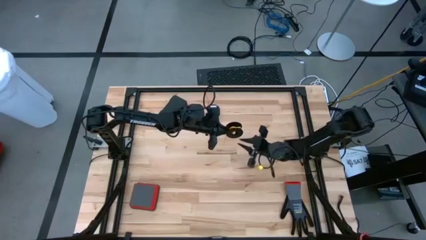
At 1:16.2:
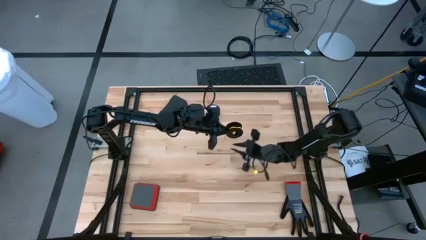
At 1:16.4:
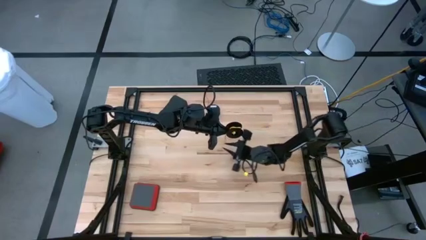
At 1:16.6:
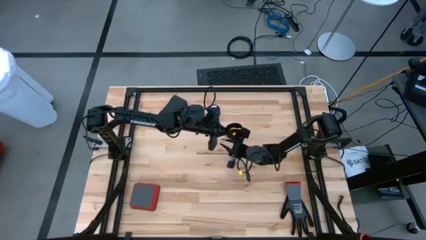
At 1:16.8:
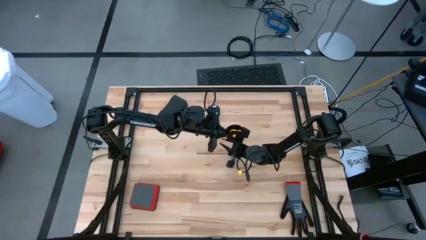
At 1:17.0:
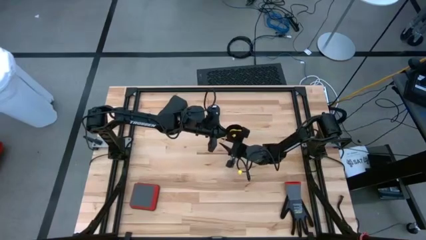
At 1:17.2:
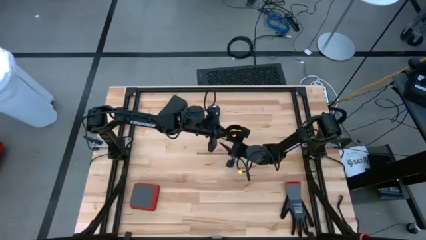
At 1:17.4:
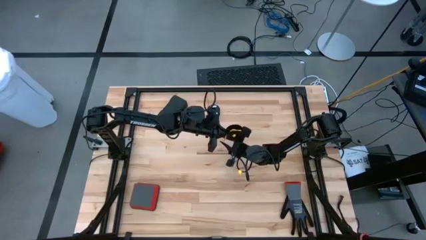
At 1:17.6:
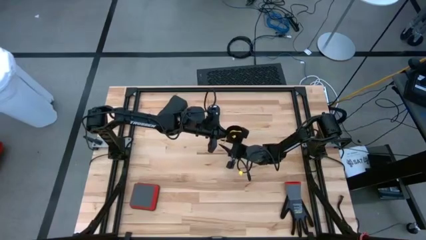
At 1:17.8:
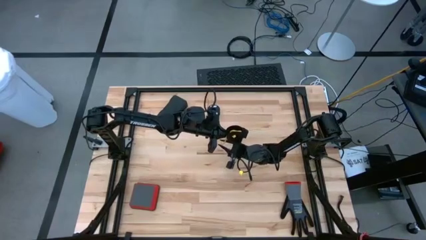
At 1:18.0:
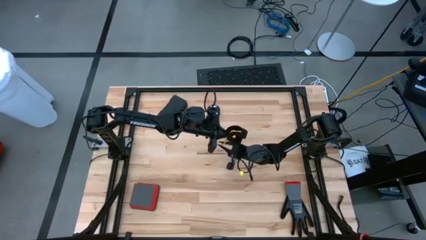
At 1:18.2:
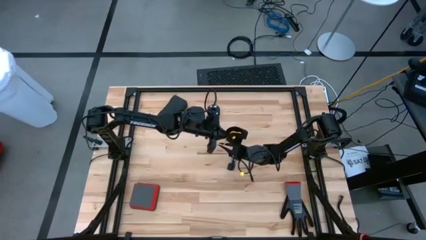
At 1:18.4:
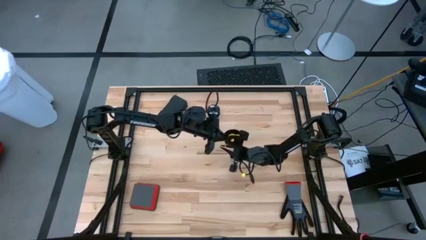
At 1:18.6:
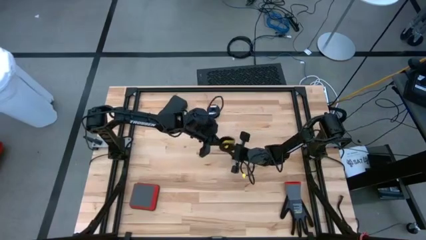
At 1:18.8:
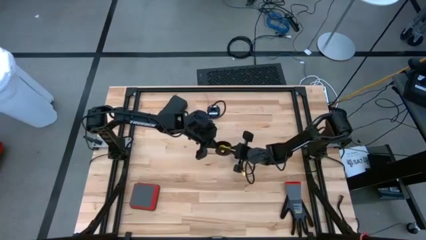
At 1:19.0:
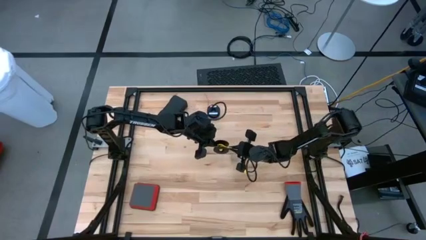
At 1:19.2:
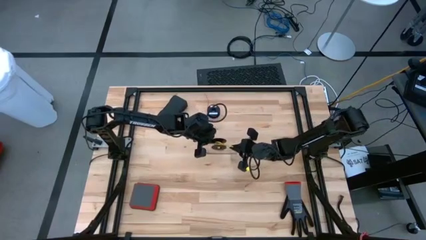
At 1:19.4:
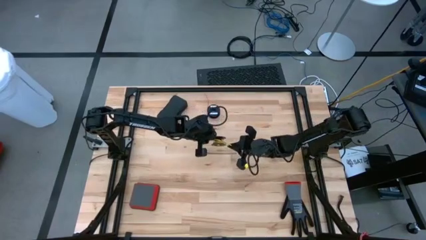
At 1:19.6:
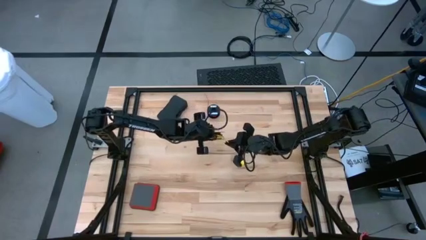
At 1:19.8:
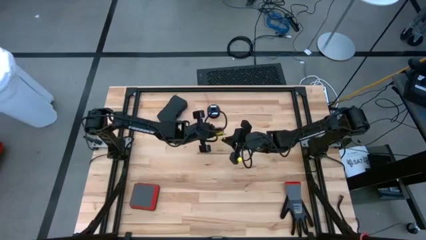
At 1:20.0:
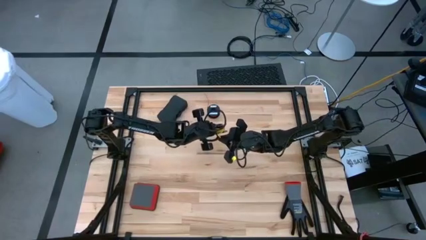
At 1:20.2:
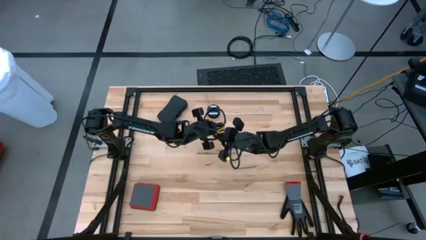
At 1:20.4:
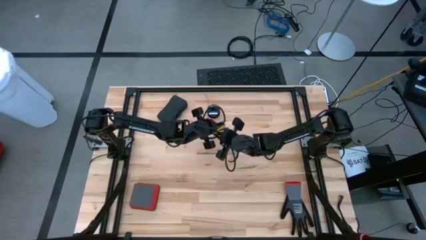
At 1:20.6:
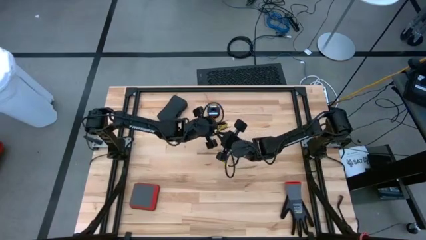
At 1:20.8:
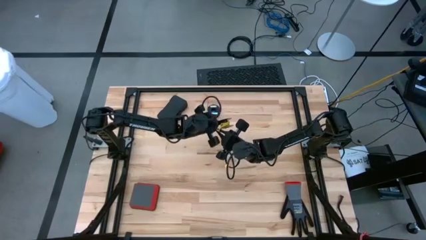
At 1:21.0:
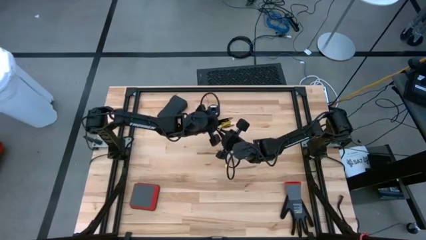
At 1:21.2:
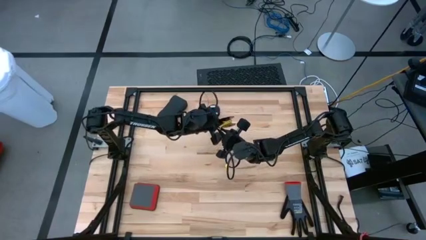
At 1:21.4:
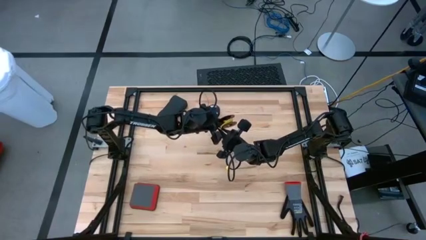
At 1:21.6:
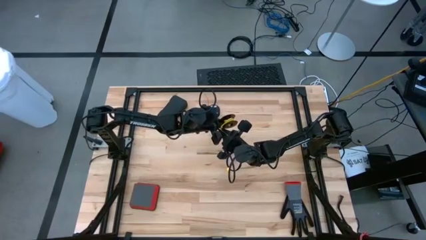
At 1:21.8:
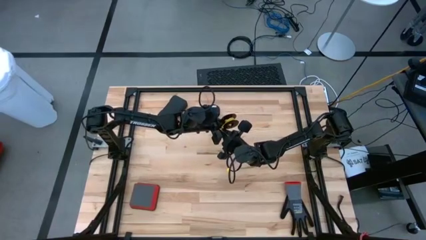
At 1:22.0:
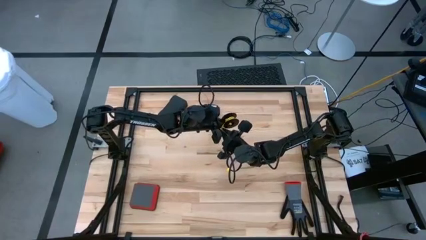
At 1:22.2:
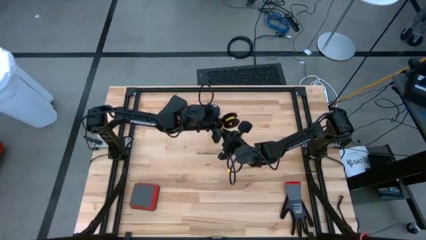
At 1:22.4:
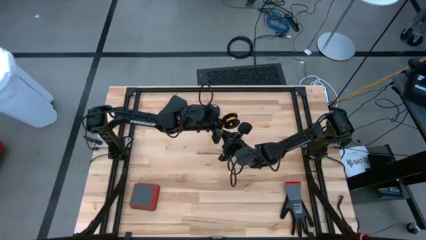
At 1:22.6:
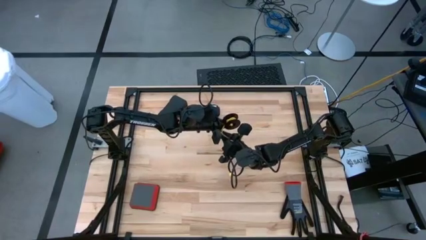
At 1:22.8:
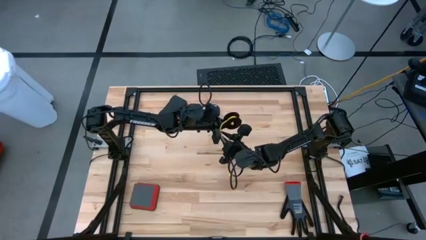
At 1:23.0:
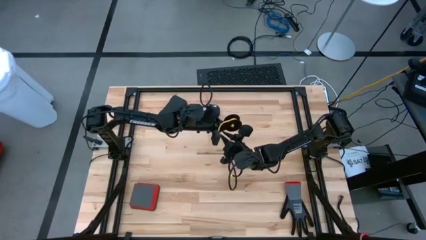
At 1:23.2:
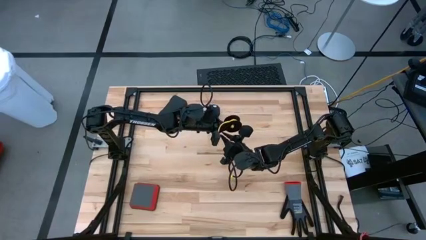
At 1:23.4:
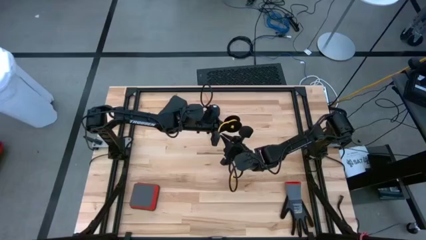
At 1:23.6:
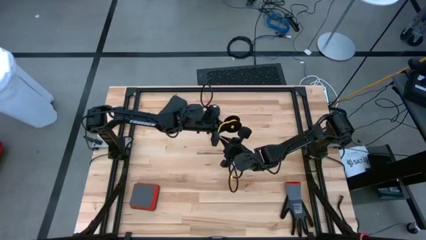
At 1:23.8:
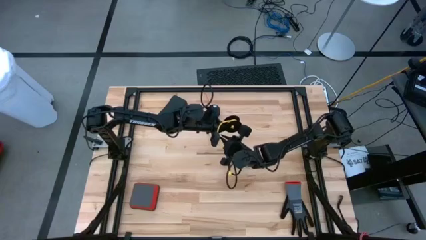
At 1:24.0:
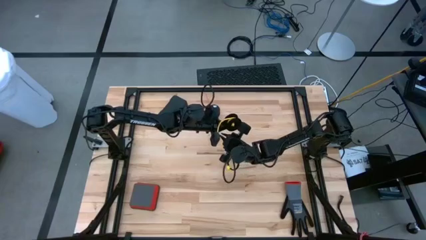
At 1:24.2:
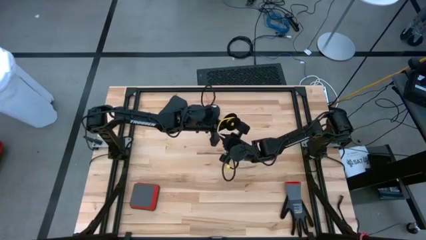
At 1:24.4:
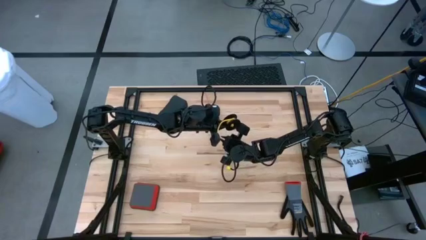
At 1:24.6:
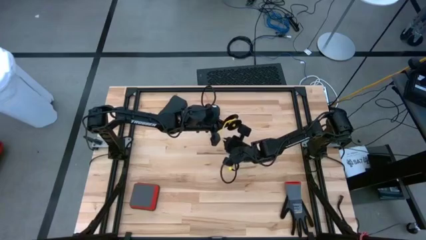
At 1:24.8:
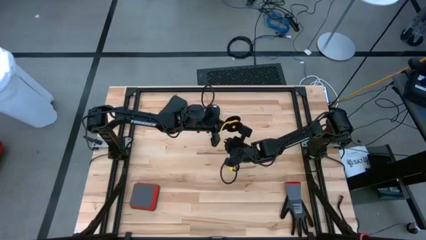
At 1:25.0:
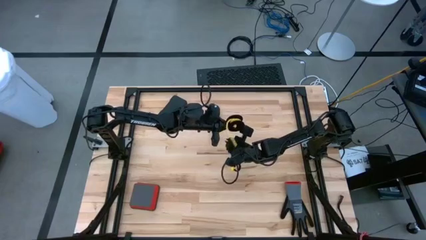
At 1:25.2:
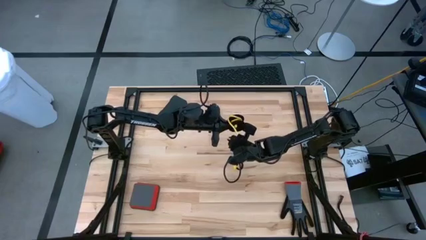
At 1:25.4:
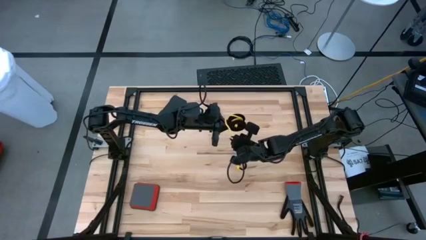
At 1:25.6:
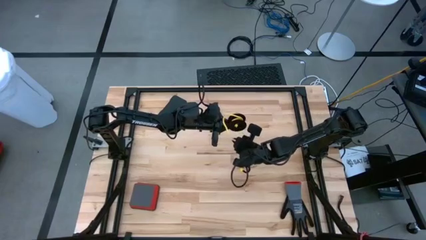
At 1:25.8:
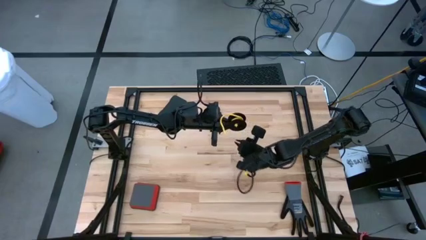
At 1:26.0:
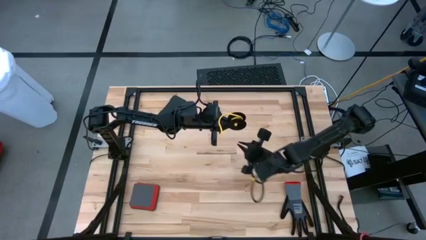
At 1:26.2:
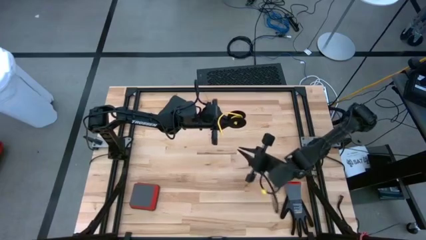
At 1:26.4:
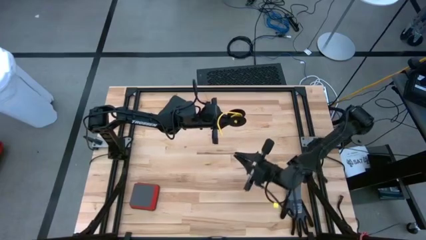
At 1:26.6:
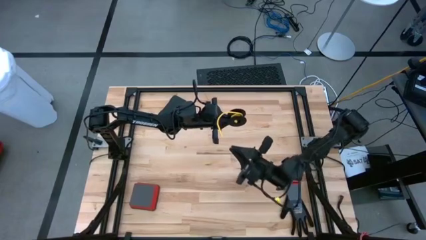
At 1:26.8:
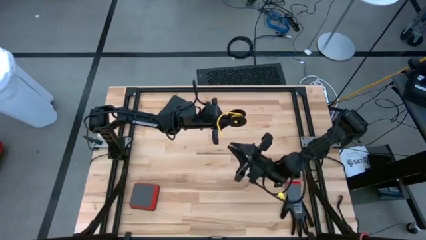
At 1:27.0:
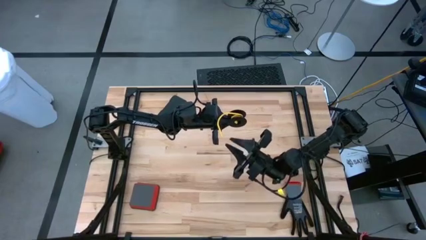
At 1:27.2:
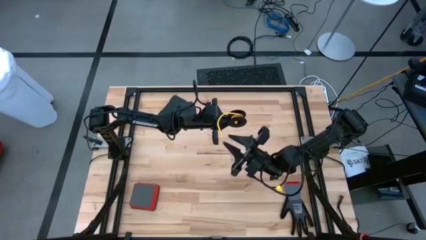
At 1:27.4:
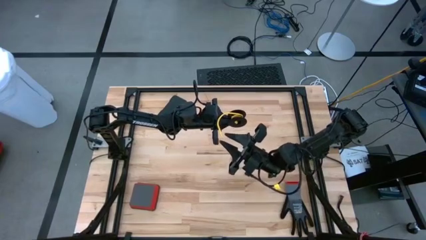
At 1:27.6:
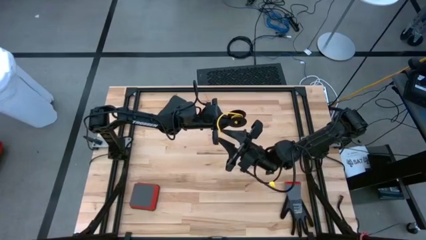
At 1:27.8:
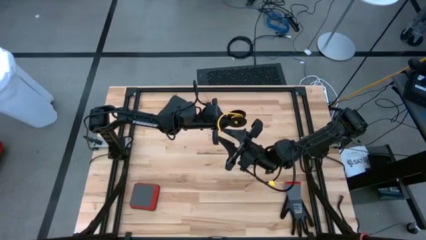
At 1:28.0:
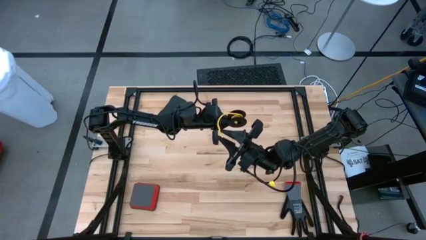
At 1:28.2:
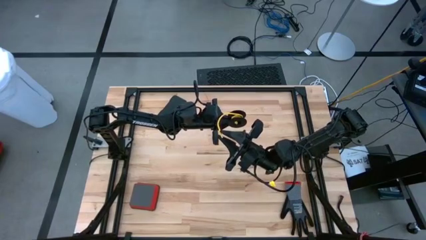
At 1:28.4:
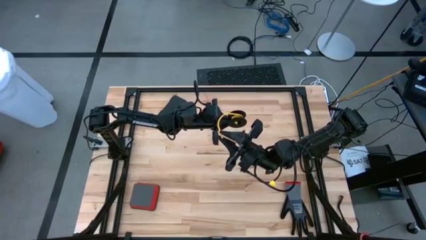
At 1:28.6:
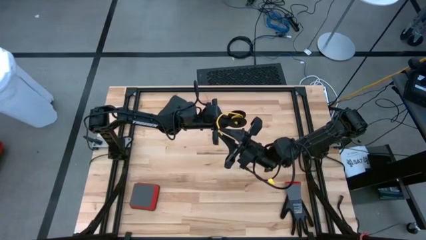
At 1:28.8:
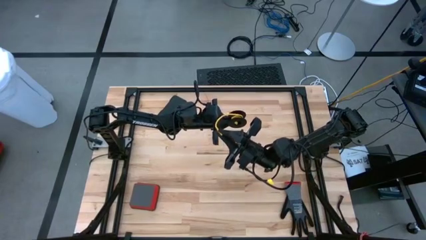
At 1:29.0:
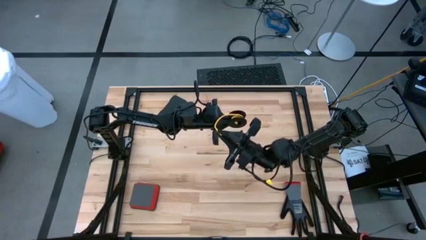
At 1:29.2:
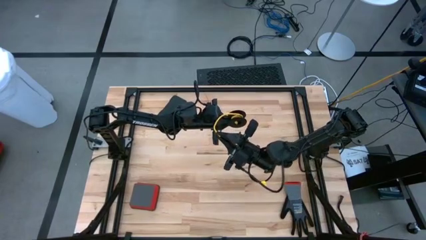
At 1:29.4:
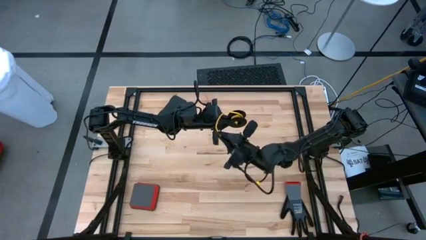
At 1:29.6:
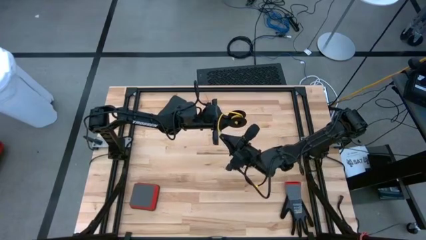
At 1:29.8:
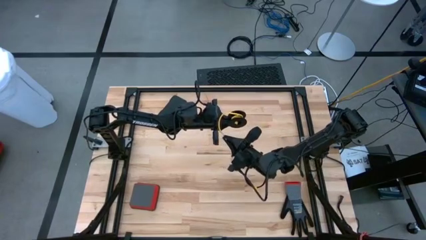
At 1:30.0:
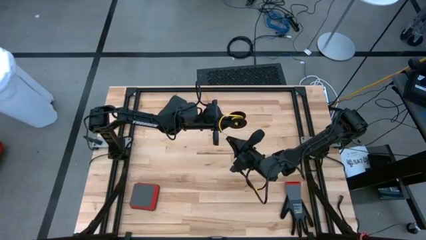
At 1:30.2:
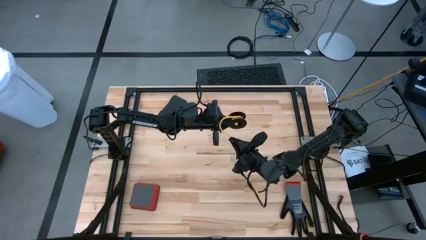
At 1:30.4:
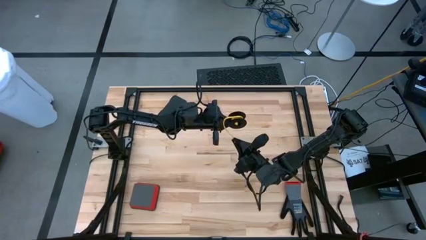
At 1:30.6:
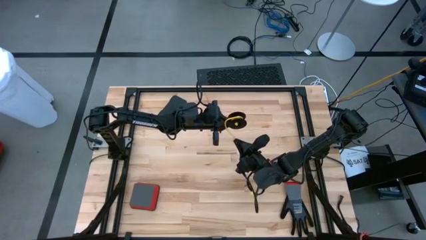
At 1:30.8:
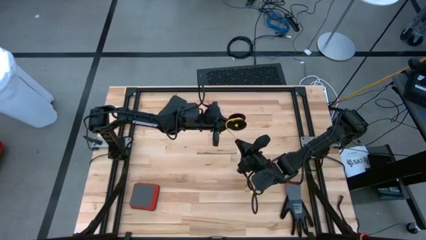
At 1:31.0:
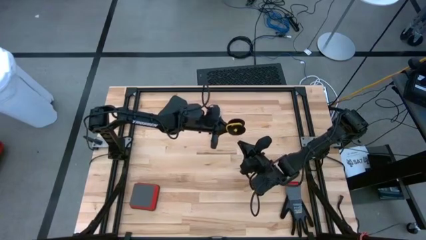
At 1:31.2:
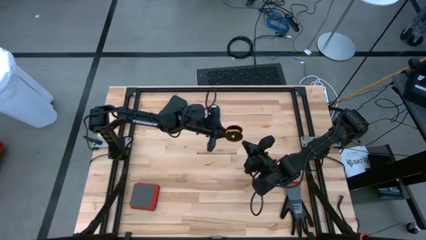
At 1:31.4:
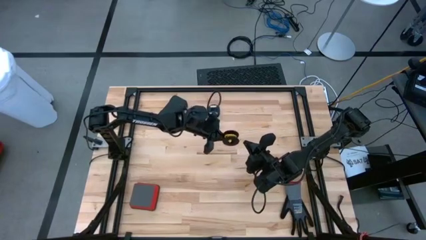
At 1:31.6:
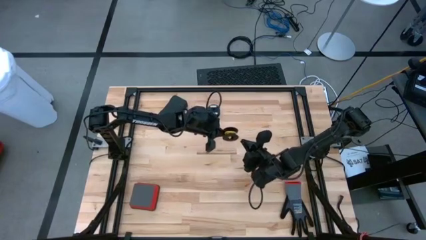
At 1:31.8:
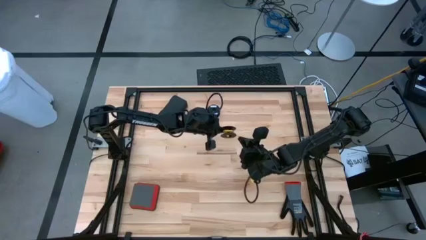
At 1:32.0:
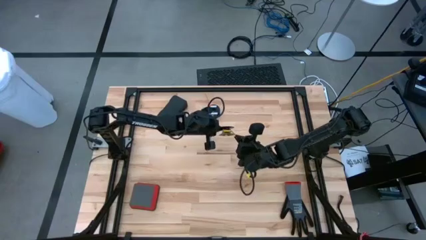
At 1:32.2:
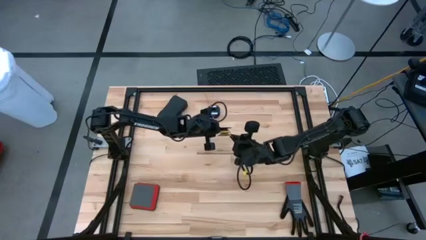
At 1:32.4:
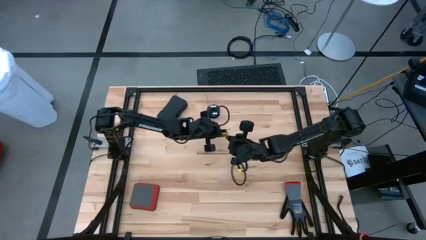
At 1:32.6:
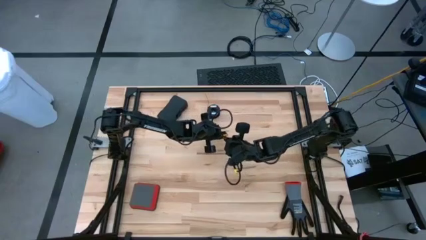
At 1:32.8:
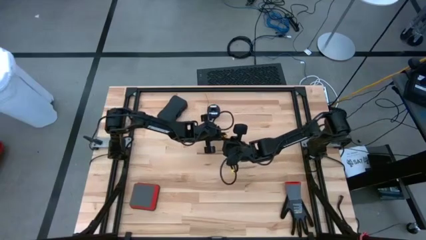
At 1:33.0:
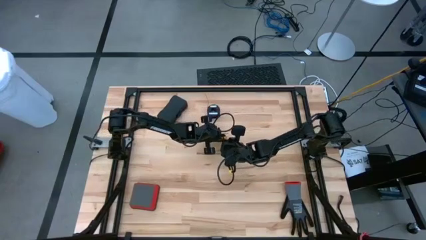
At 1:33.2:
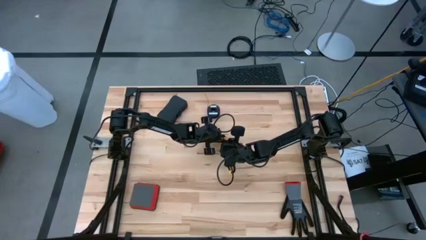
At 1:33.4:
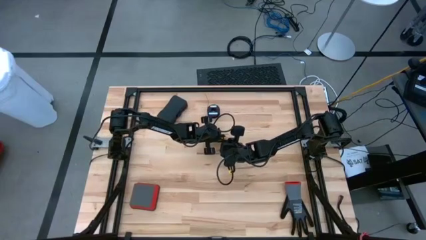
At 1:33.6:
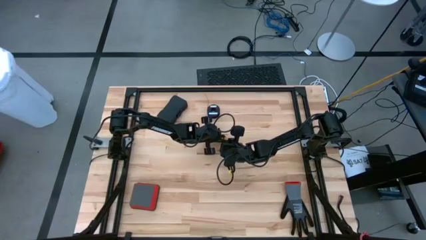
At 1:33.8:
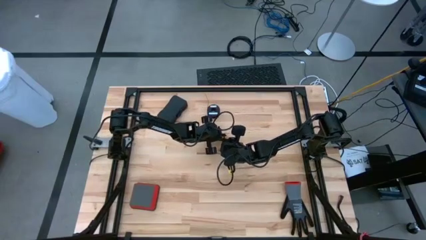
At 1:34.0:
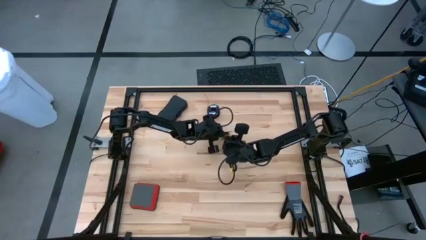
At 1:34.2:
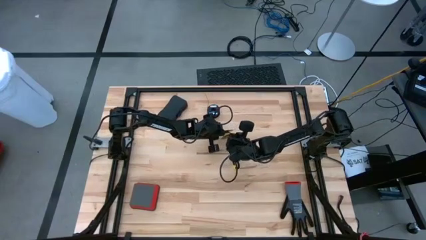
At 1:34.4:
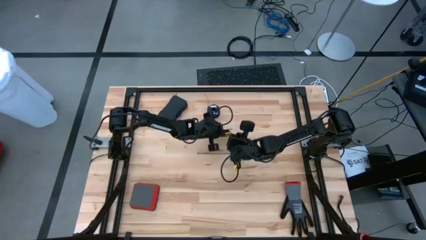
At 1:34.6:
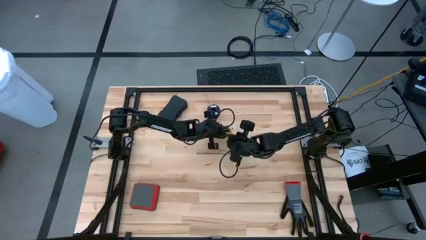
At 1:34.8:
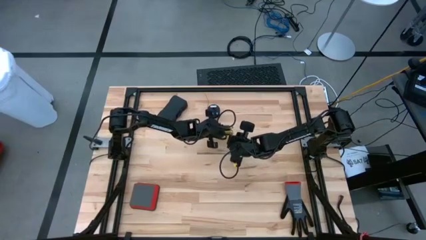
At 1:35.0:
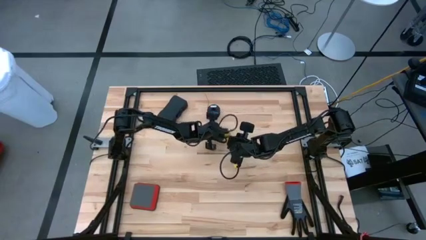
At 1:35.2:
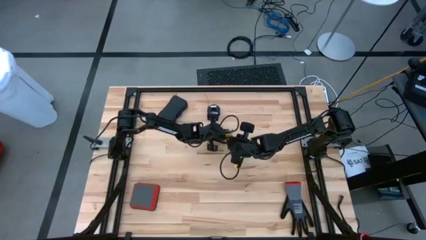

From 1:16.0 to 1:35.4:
Task: Coil cords
Coil the yellow wire onto the black spool
